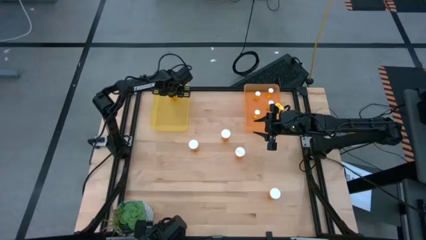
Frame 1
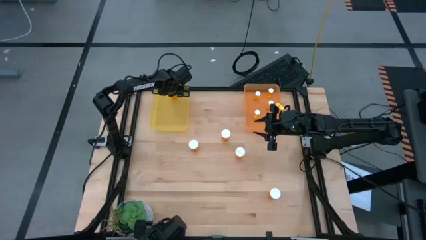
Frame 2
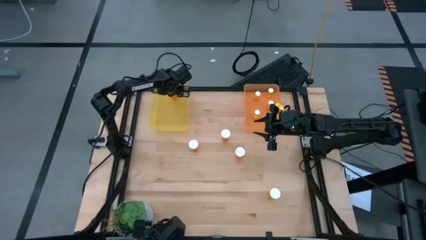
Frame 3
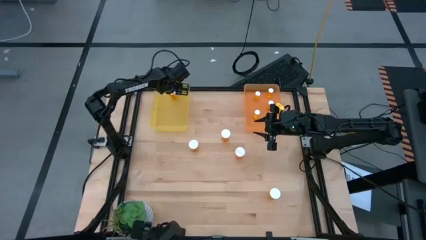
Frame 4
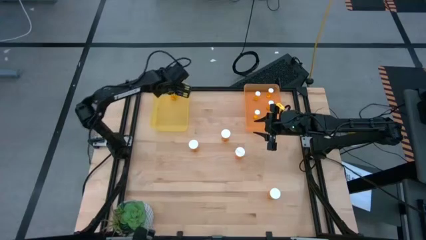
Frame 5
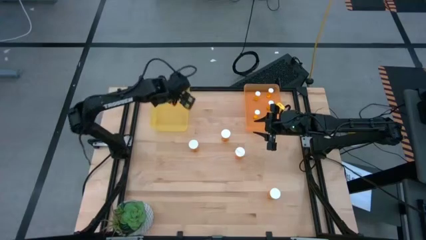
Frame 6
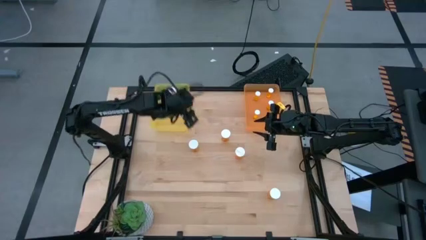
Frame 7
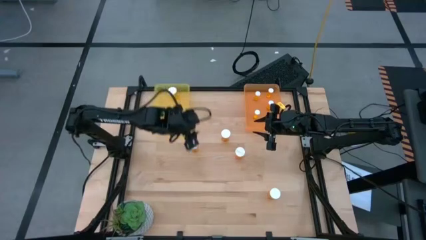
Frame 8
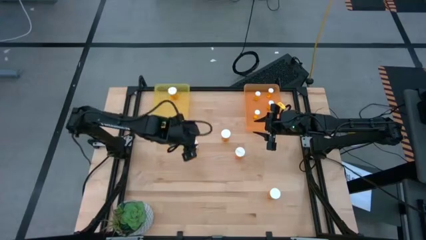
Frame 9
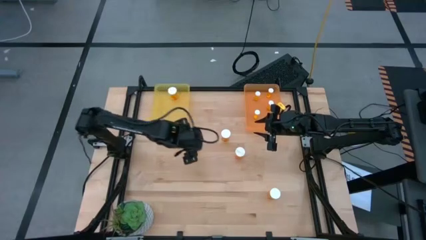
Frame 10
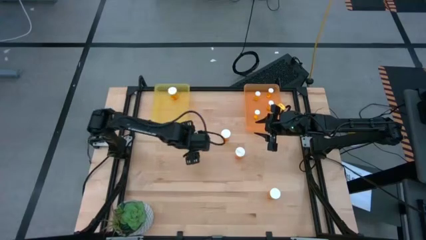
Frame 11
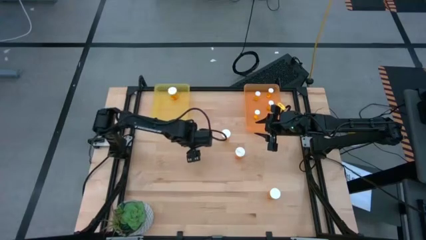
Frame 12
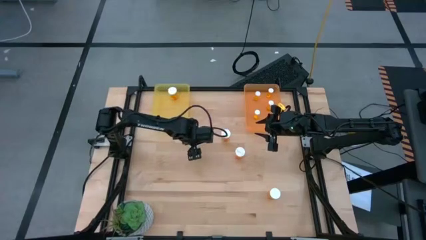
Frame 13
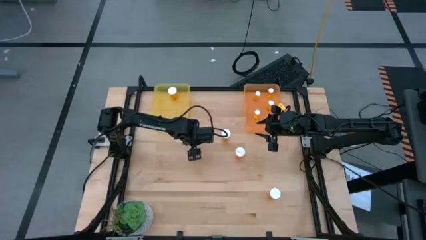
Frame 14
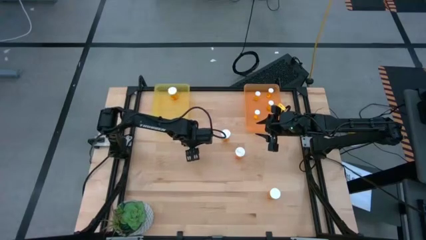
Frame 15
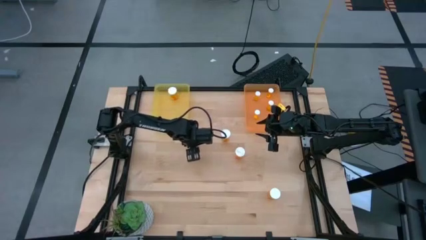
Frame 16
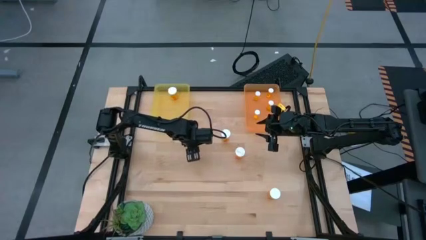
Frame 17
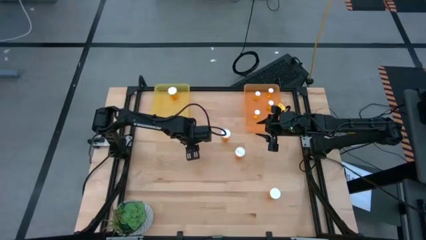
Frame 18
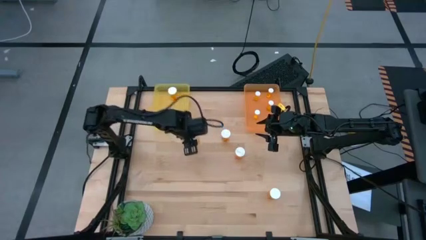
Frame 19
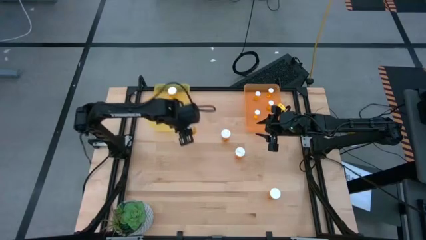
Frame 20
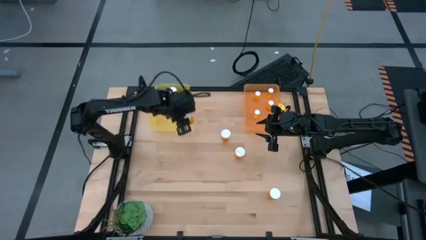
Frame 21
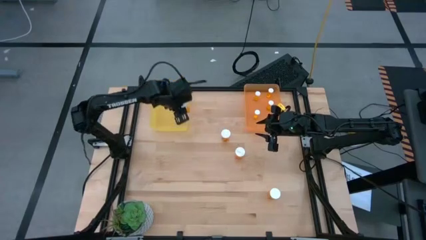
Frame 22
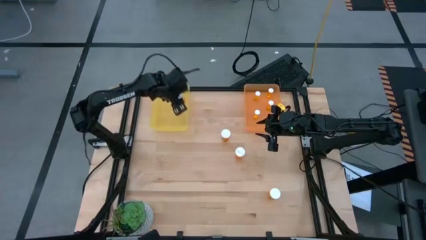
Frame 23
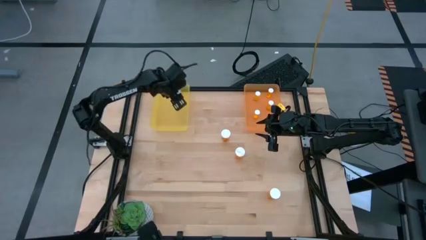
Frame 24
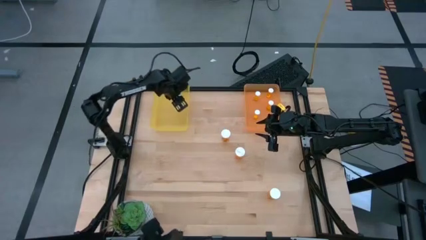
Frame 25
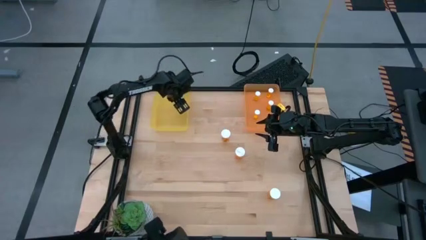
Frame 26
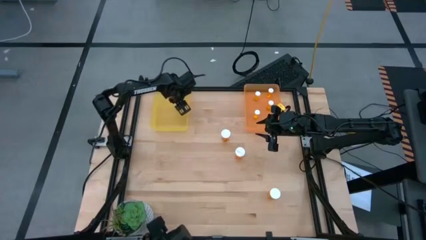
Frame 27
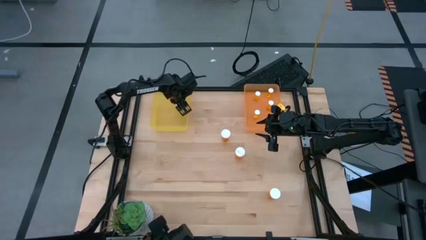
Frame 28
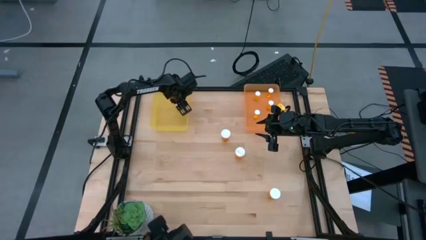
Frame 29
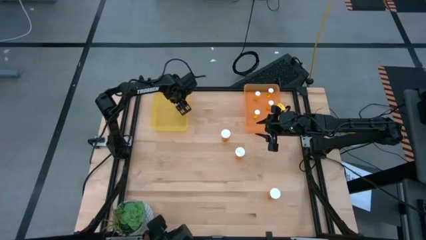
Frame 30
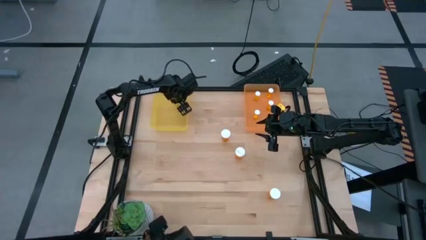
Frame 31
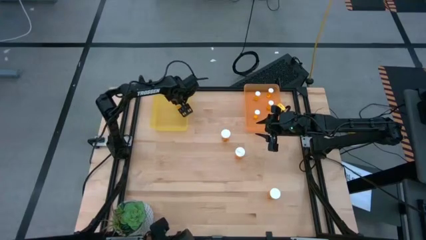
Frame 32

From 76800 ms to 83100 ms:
Task: Pick and place medicine bottles into bin by pill shape (circle, oval)
Put the large orange pill bottle into the yellow bin

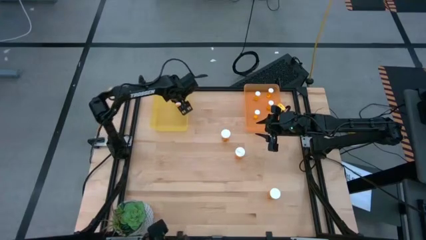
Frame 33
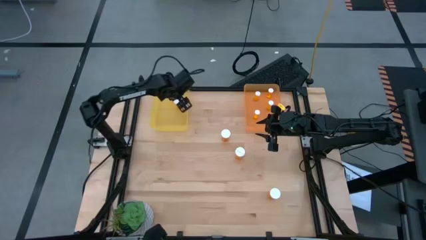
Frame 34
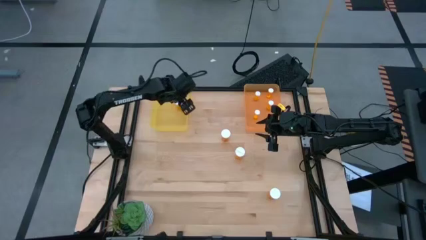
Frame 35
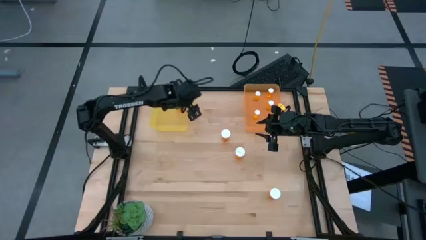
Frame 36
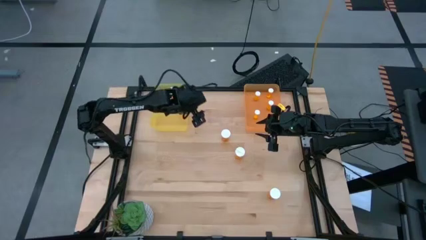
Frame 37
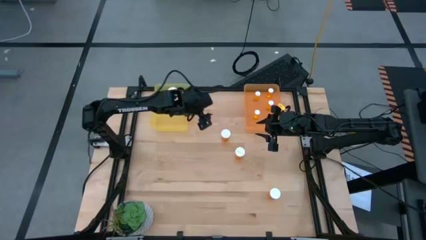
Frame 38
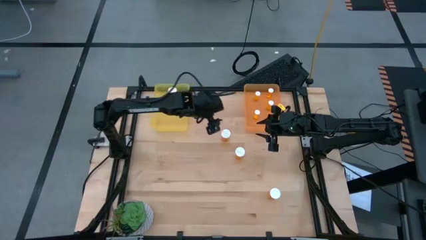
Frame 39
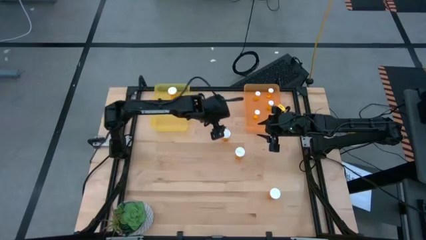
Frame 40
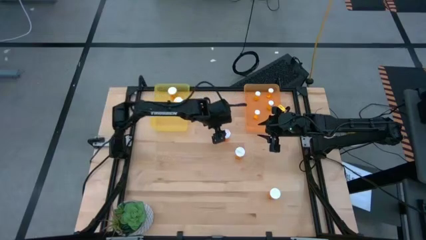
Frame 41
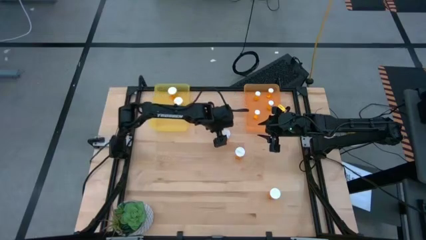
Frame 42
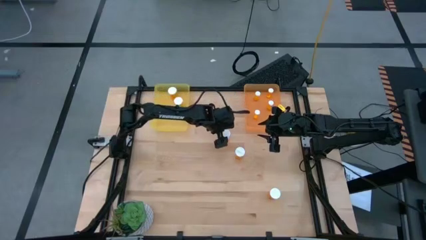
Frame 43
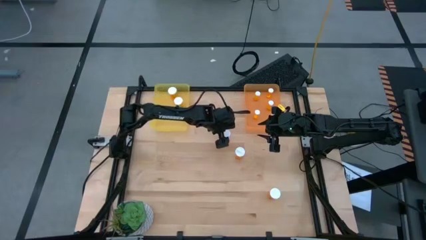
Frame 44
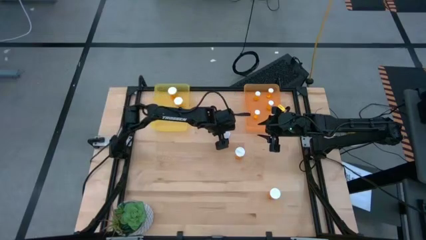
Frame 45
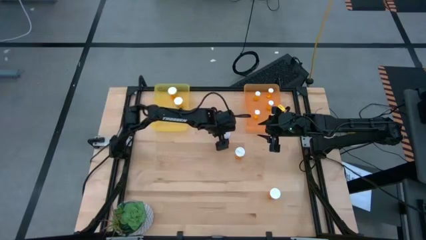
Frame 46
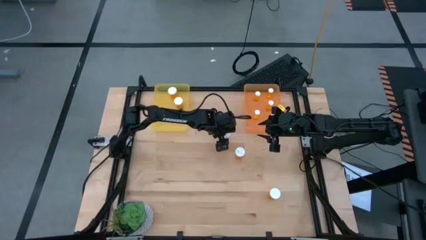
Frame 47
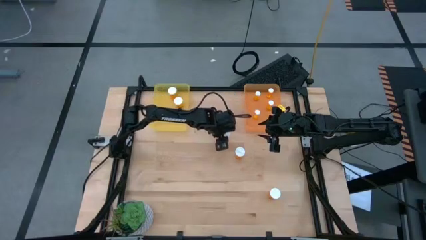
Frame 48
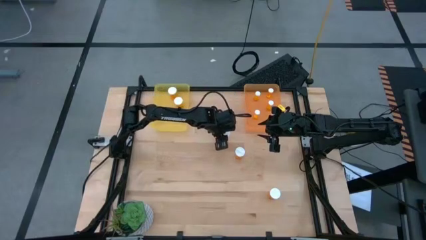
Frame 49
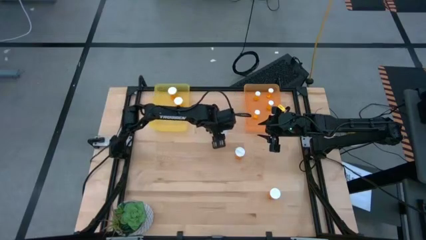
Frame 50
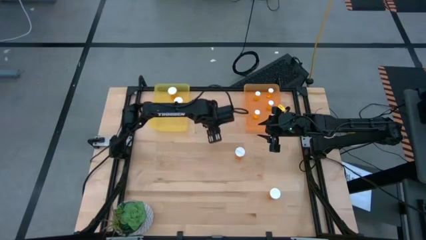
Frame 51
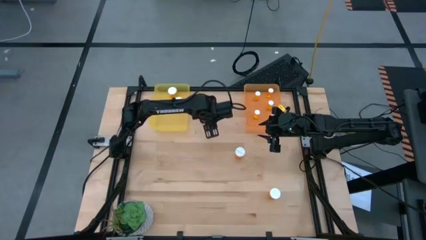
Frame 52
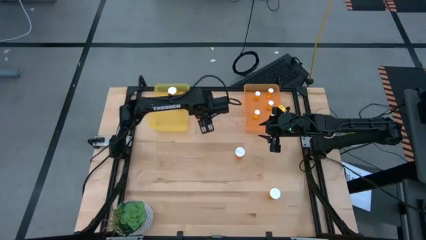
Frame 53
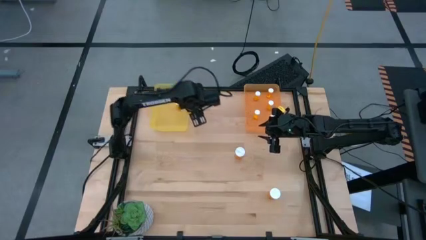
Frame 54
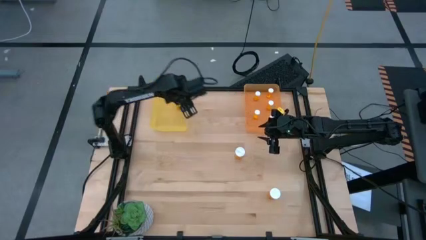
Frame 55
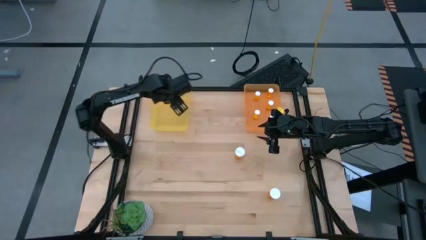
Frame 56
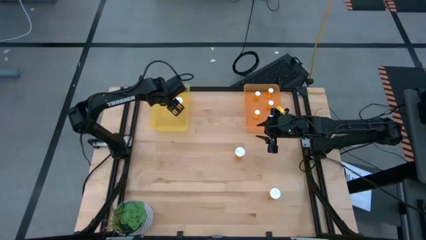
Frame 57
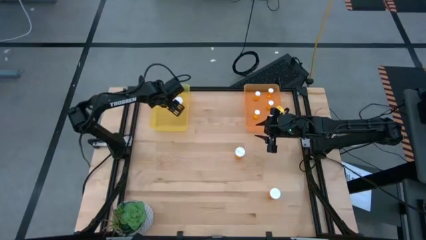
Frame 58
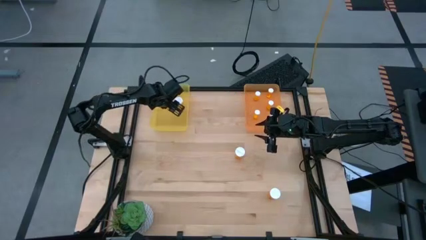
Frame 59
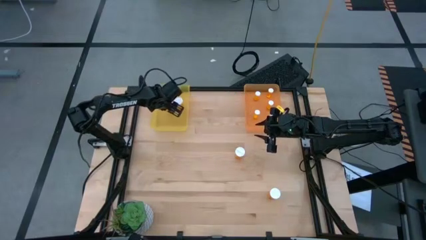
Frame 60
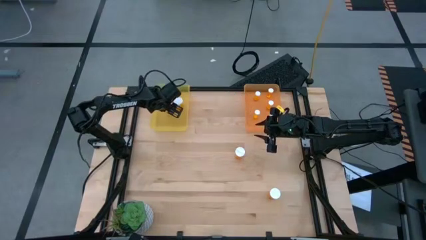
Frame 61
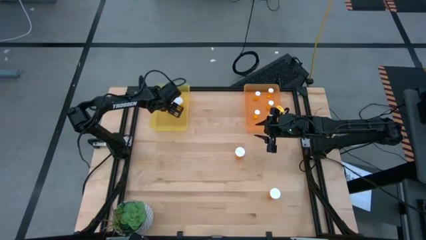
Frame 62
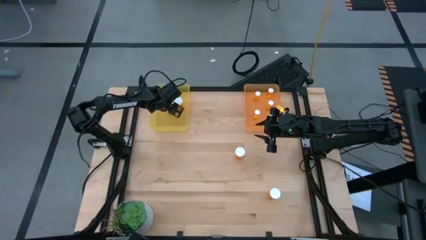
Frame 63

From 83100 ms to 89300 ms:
Put the large orange pill bottle into the yellow bin
